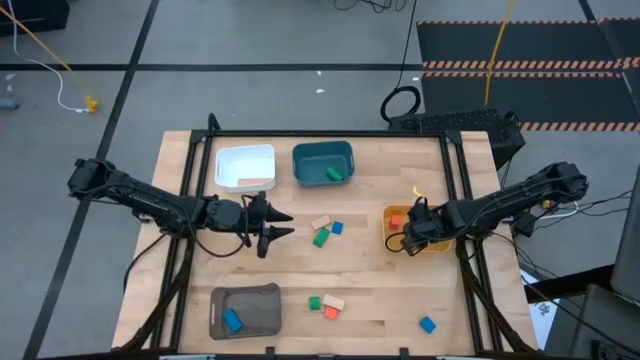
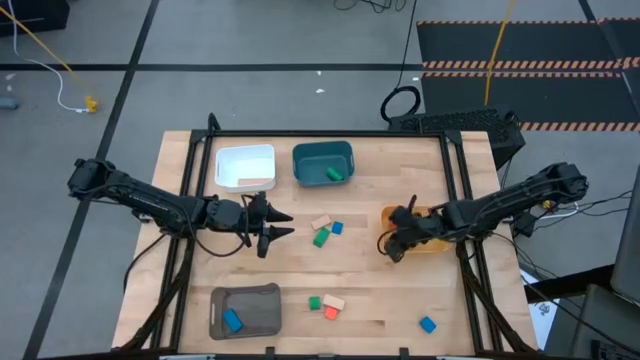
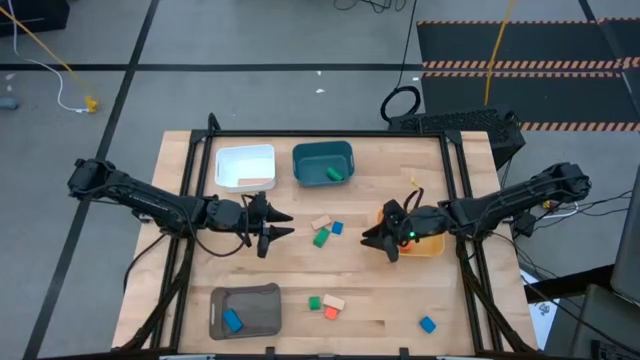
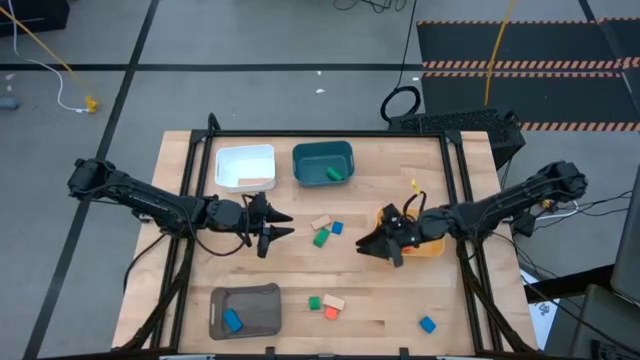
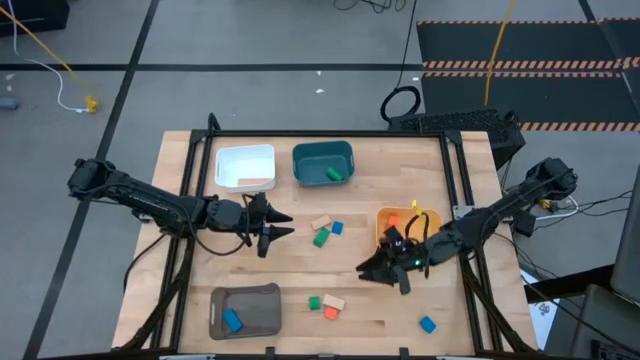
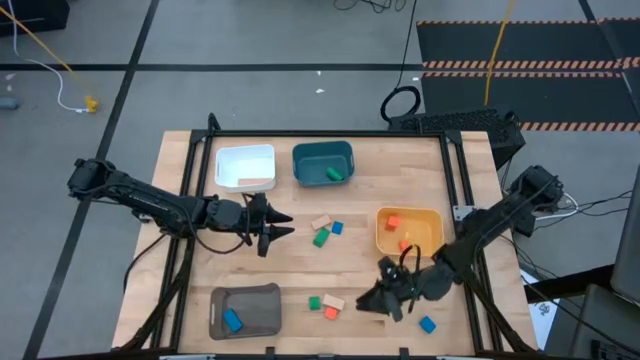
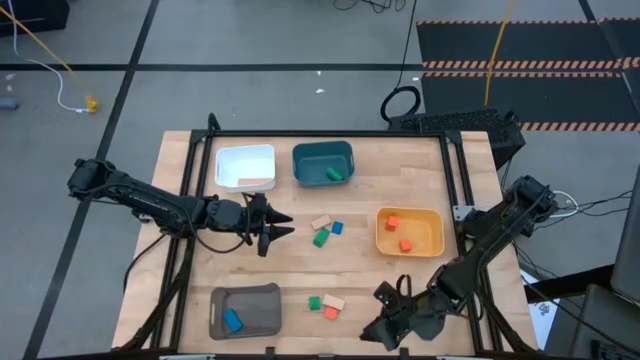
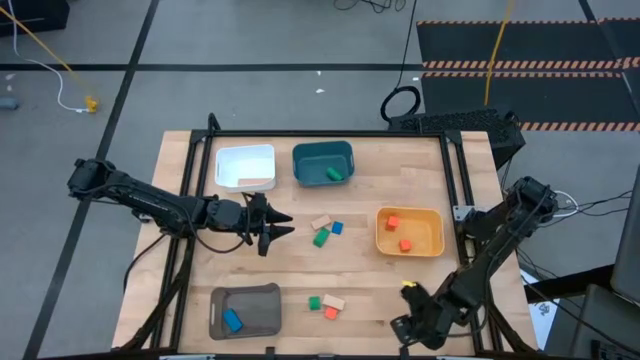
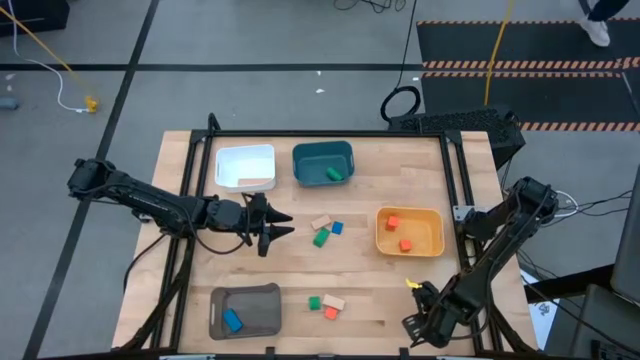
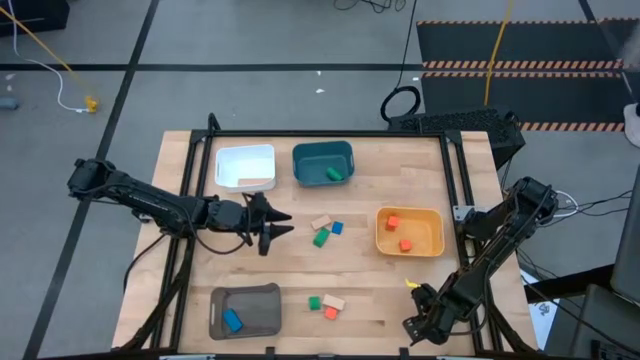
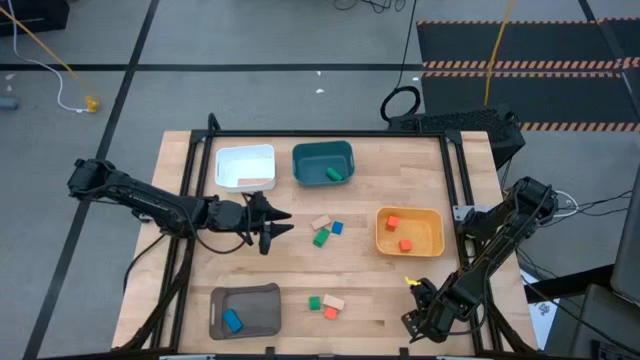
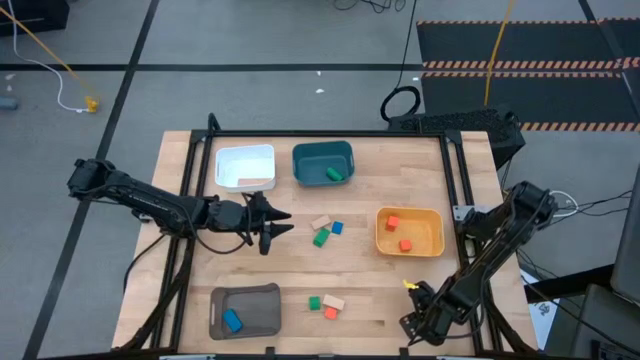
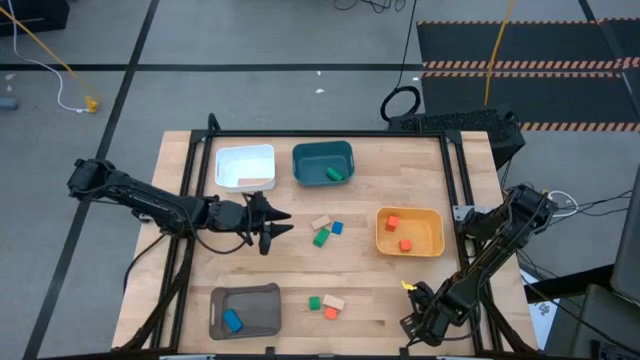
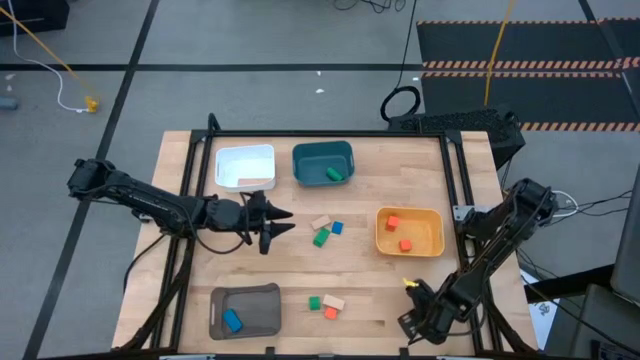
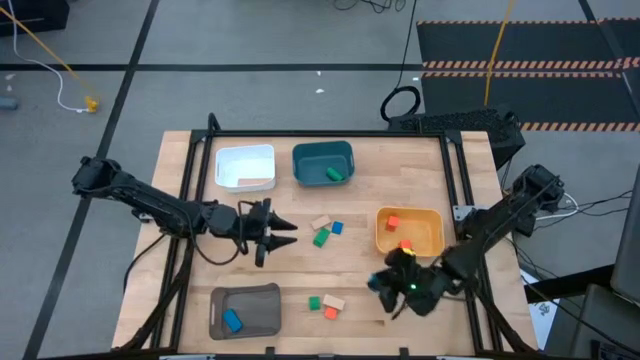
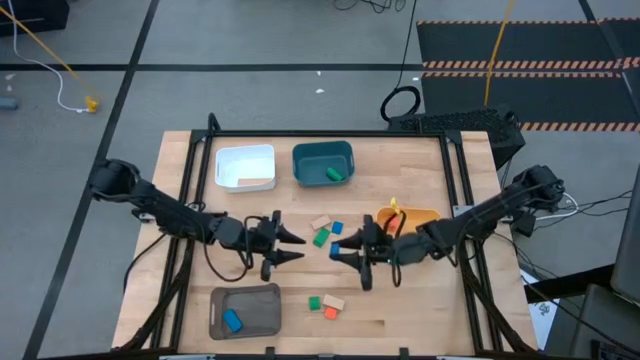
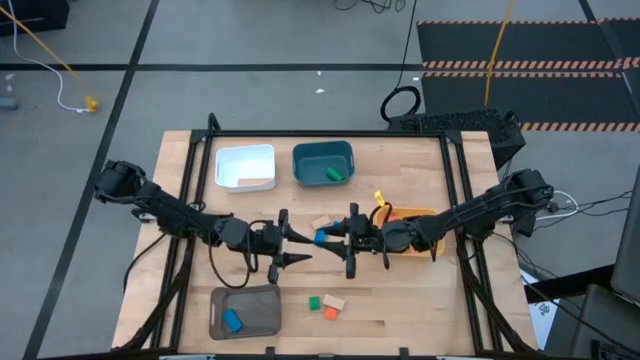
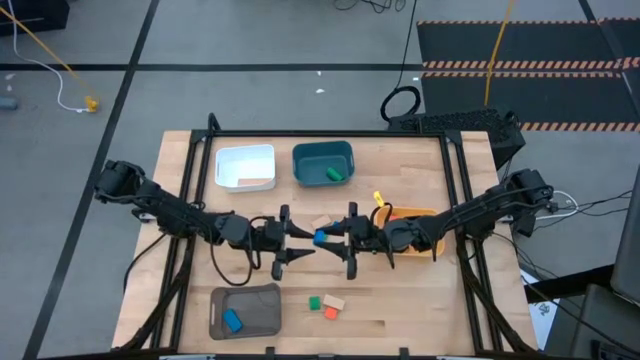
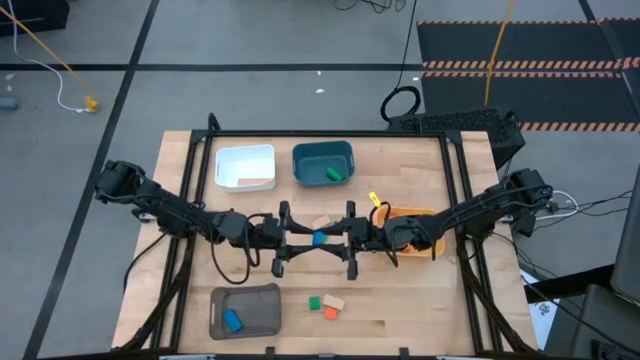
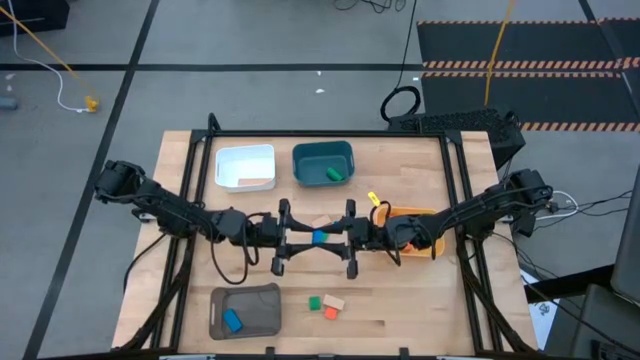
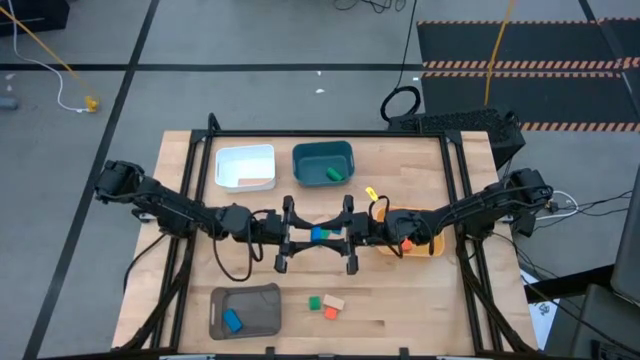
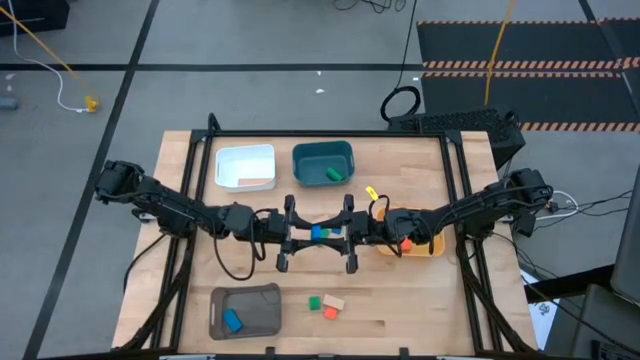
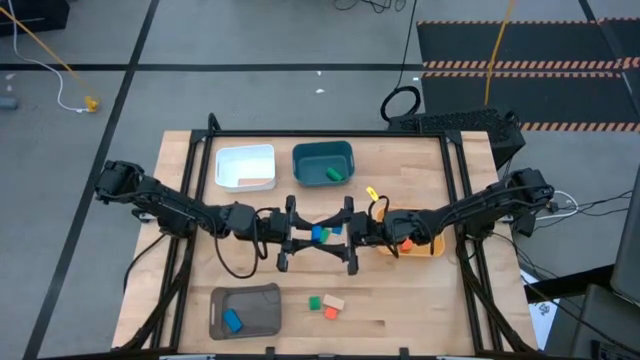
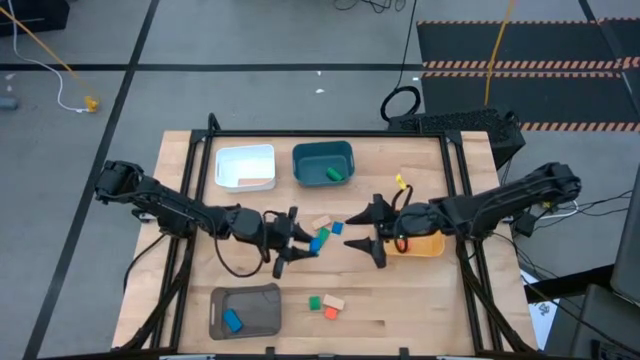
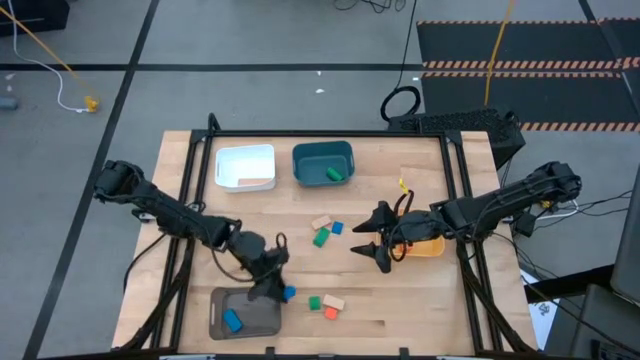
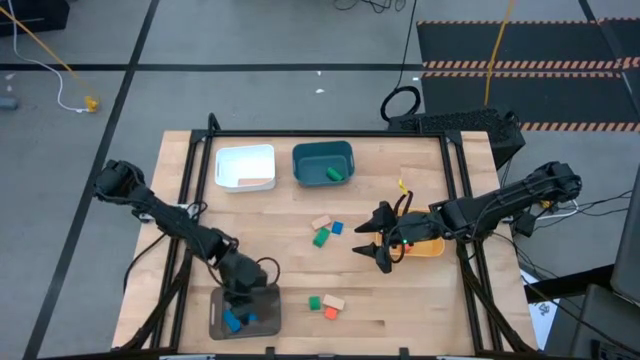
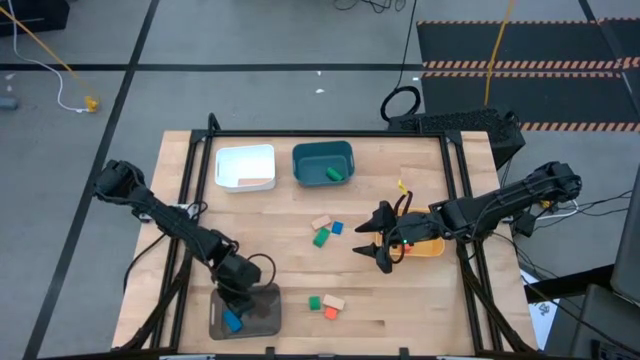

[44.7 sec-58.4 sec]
Task: Sort & place blocks by color
Put the bottom blue block into the black bin

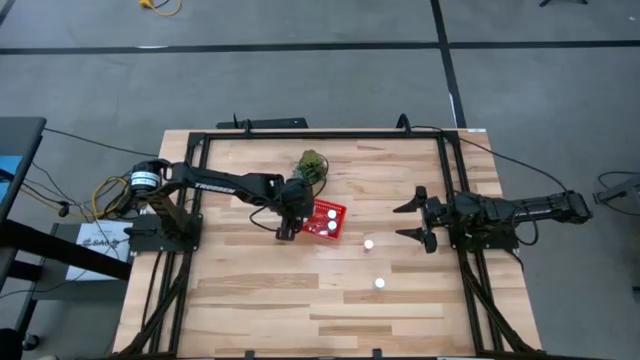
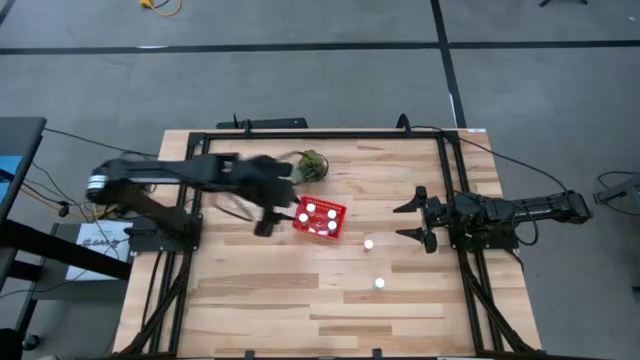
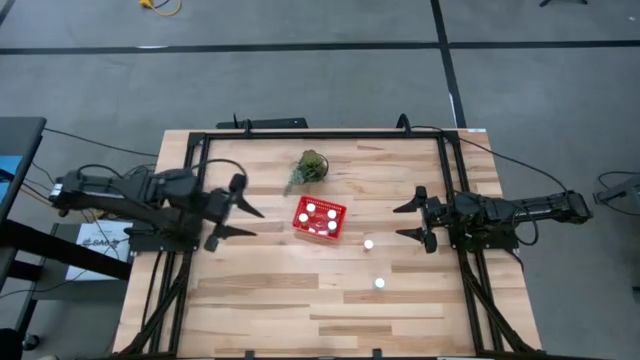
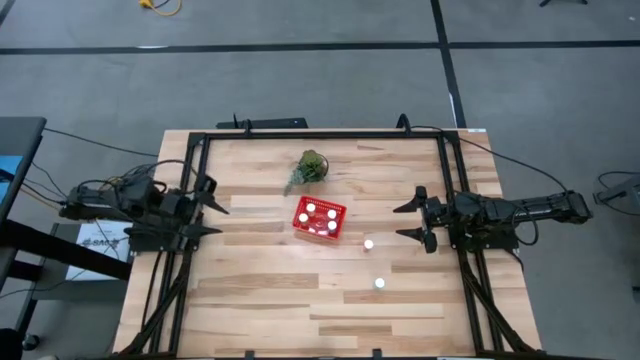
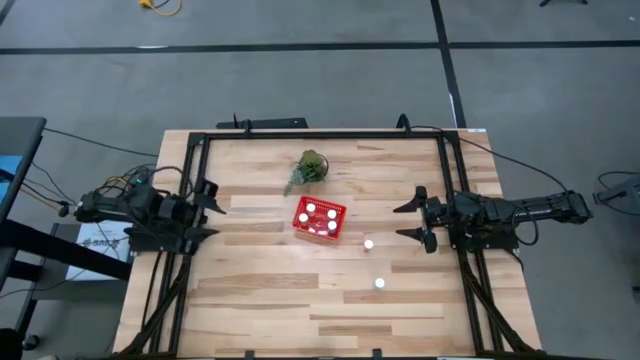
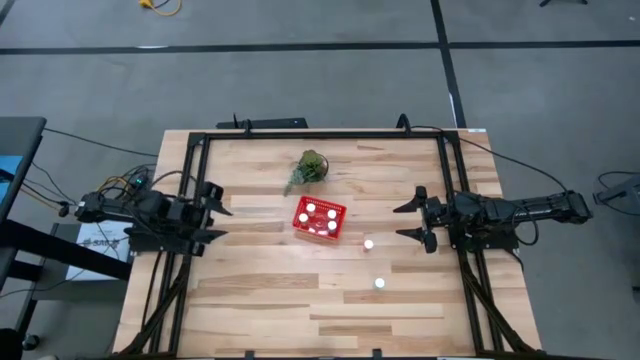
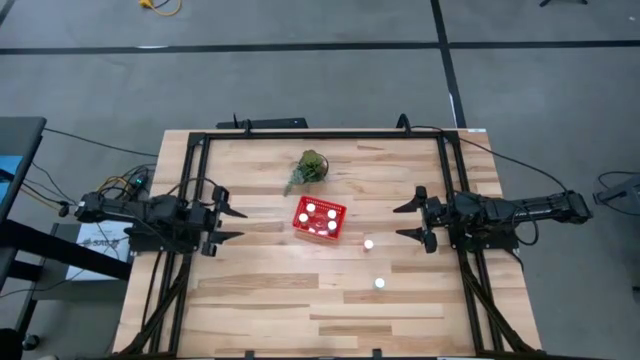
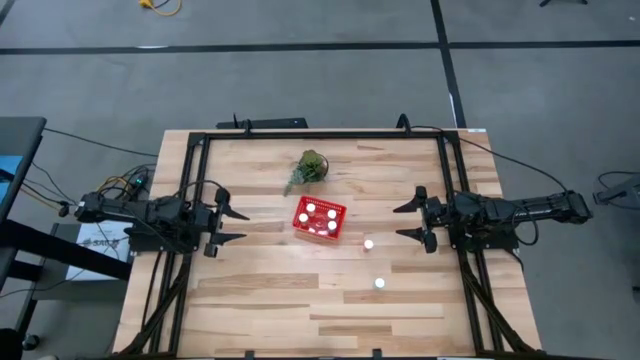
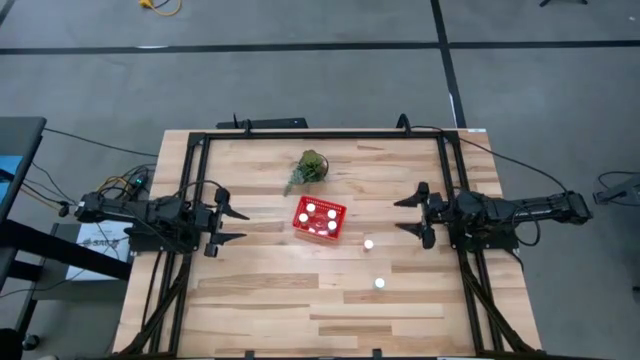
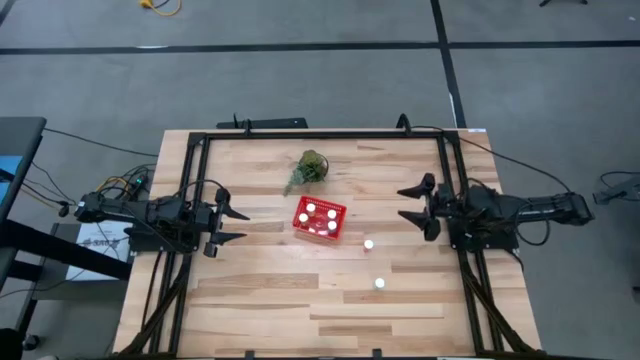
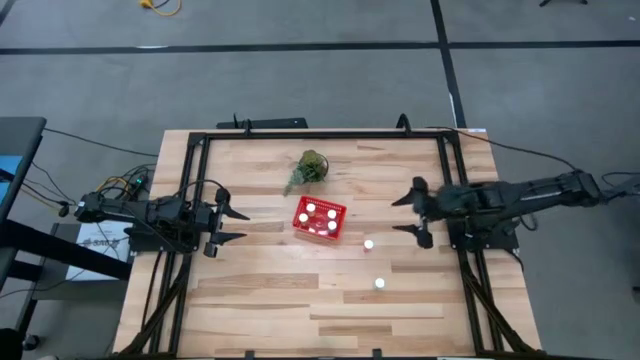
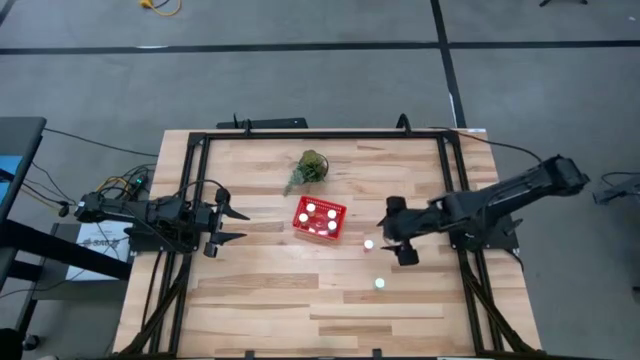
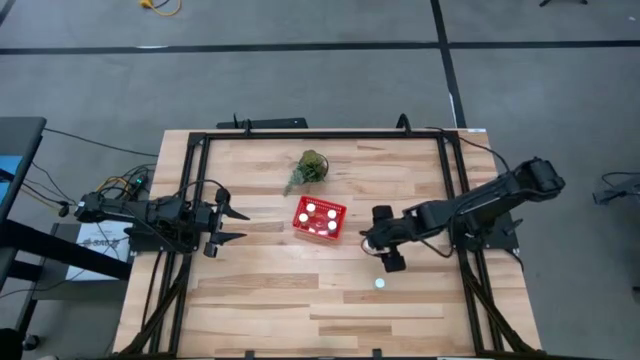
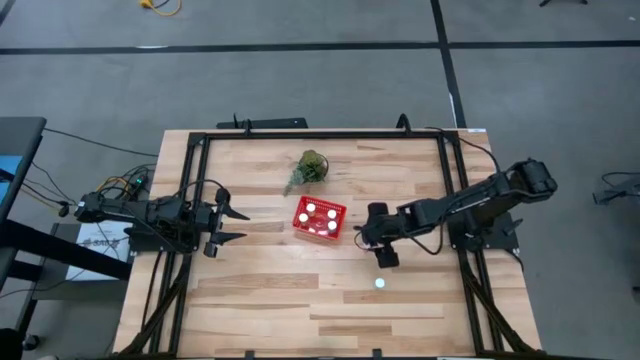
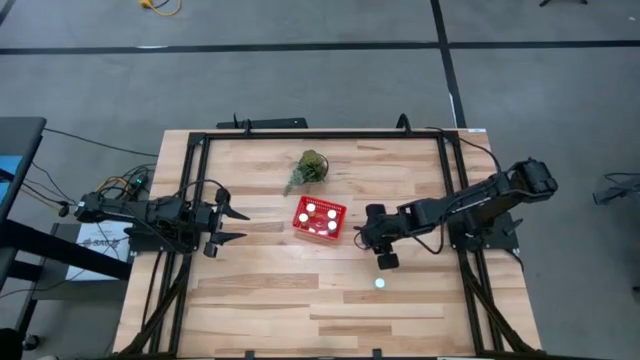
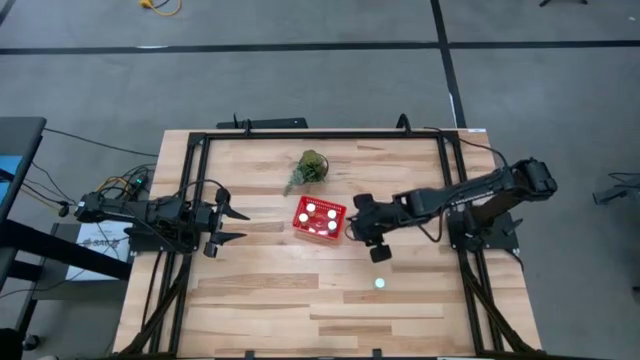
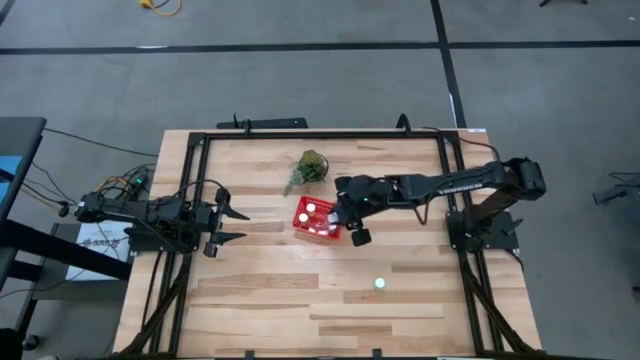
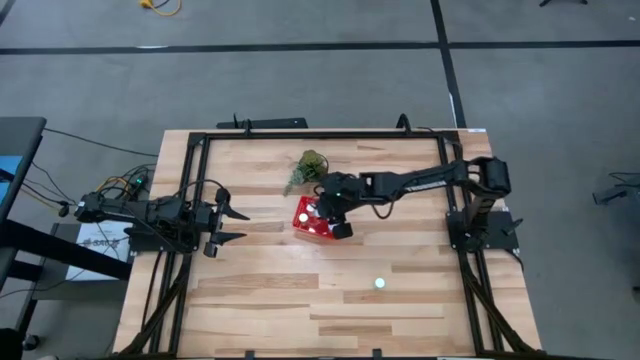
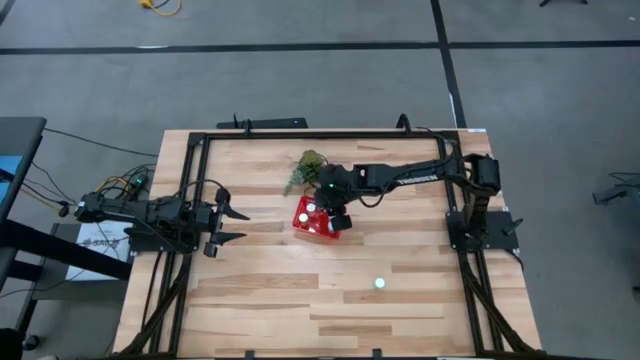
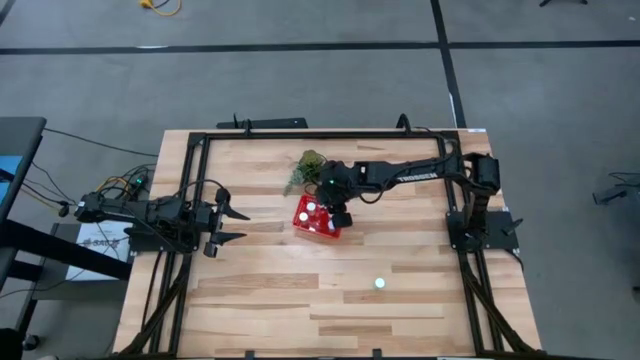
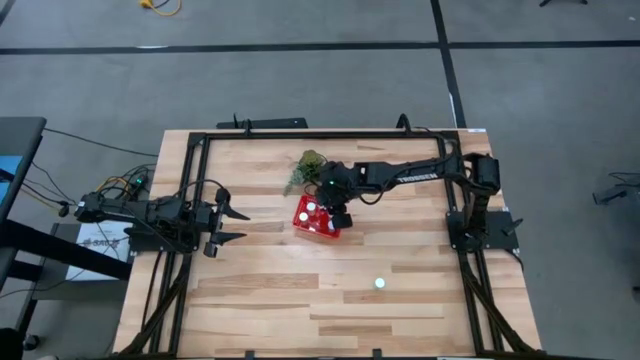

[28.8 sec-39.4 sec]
Task: Pick and place pill bottles into a basket
Put the pink medicine bottle into the red bin
